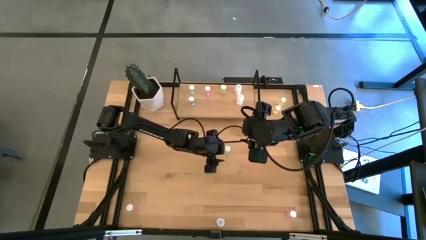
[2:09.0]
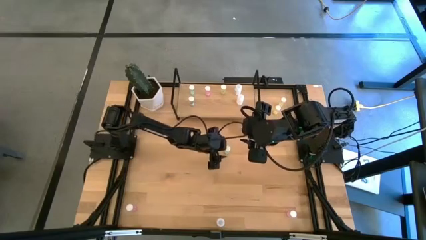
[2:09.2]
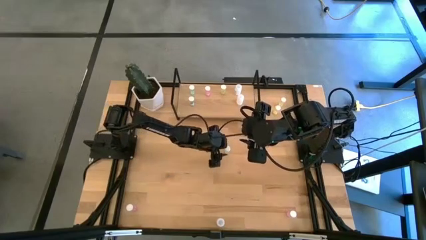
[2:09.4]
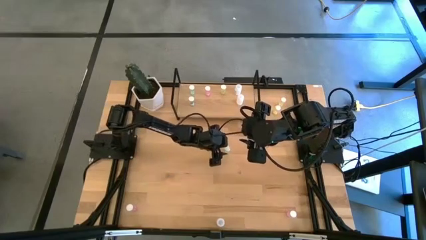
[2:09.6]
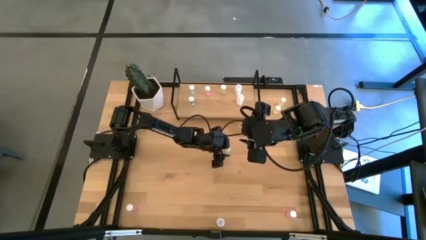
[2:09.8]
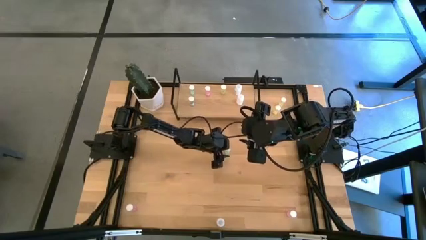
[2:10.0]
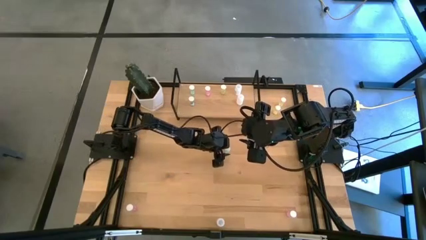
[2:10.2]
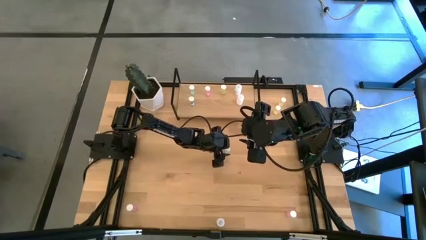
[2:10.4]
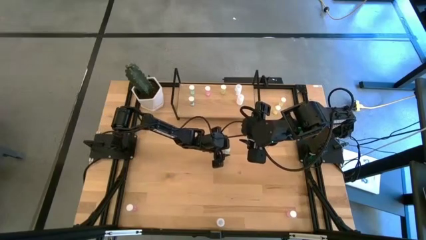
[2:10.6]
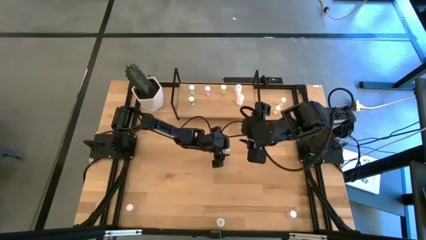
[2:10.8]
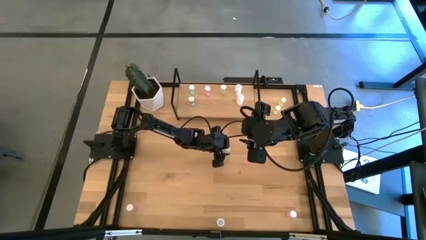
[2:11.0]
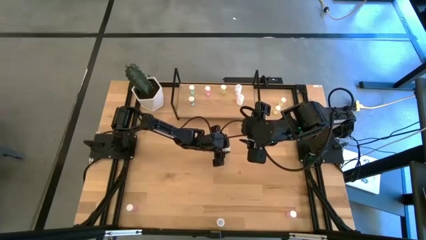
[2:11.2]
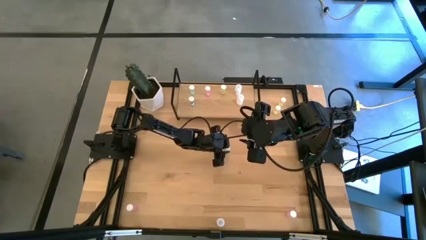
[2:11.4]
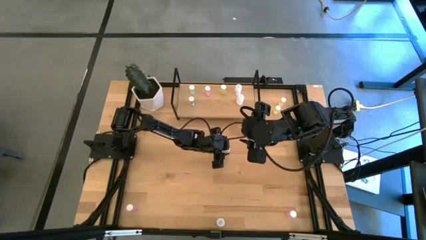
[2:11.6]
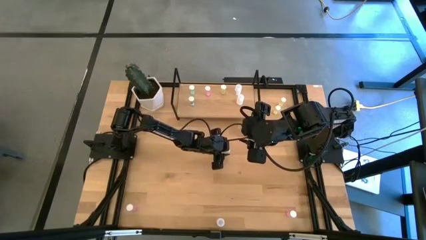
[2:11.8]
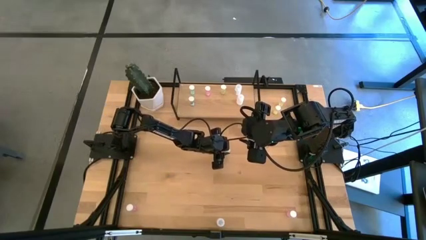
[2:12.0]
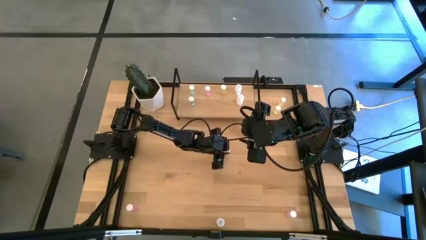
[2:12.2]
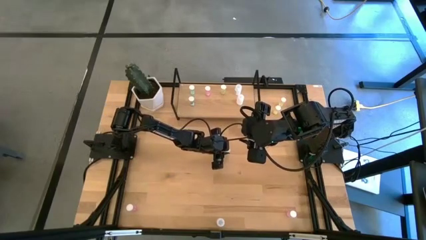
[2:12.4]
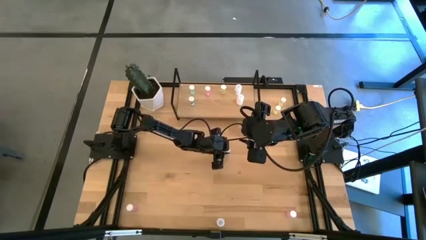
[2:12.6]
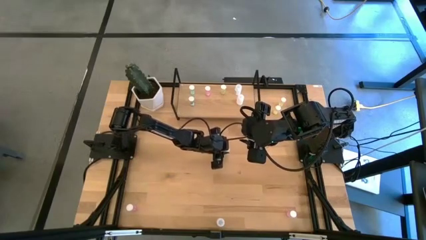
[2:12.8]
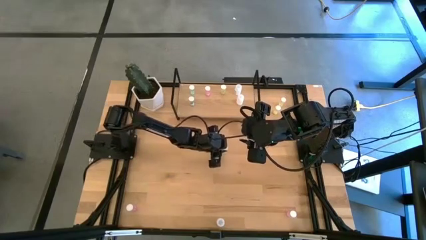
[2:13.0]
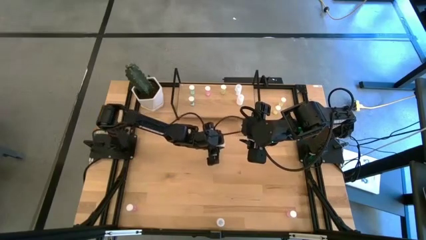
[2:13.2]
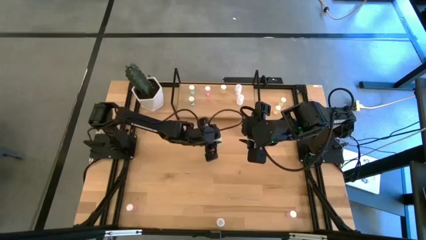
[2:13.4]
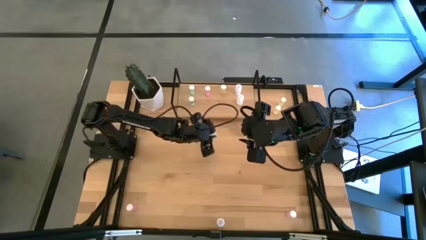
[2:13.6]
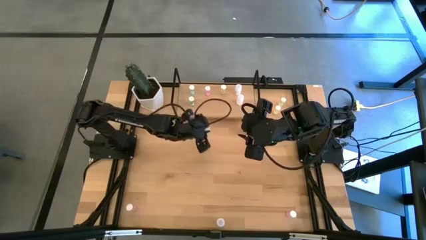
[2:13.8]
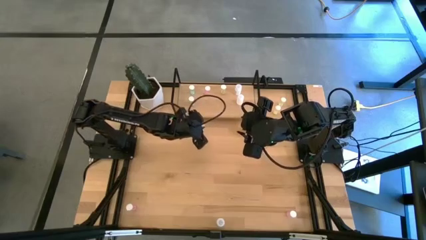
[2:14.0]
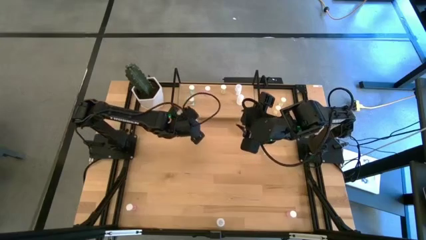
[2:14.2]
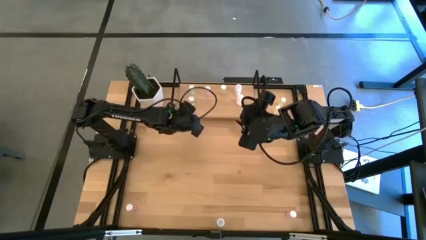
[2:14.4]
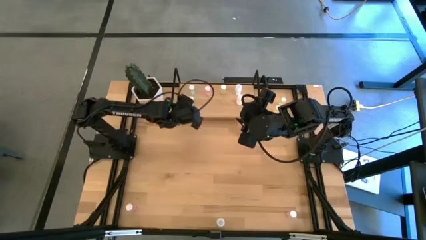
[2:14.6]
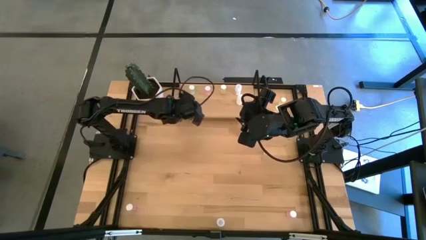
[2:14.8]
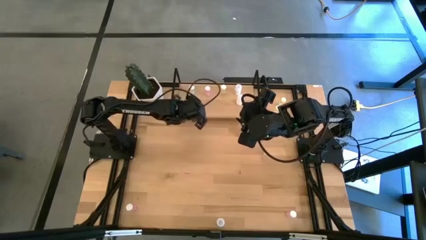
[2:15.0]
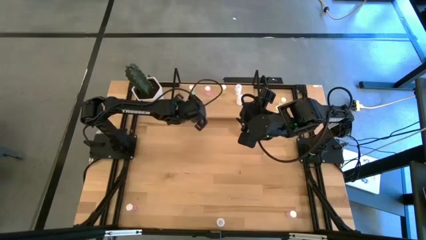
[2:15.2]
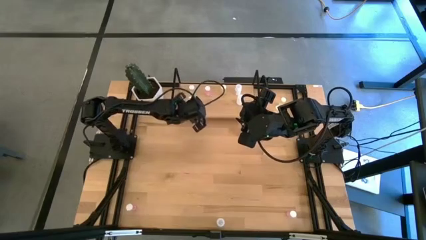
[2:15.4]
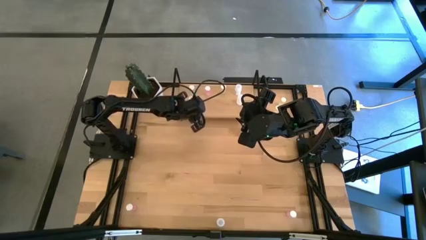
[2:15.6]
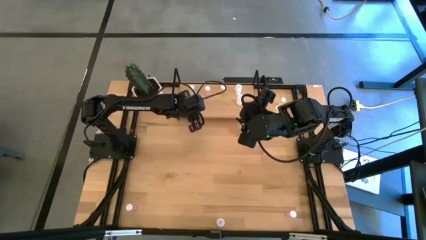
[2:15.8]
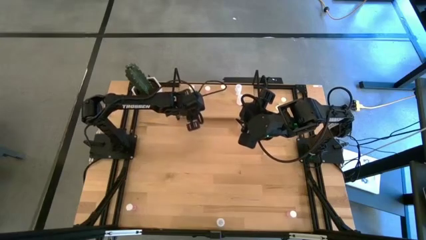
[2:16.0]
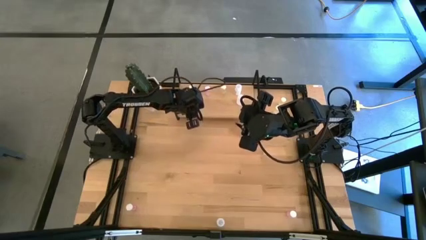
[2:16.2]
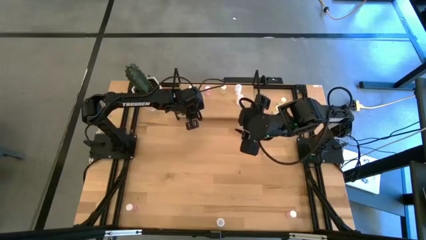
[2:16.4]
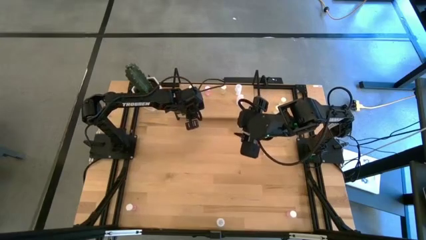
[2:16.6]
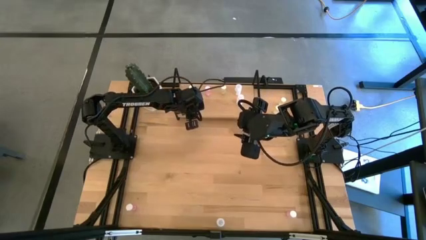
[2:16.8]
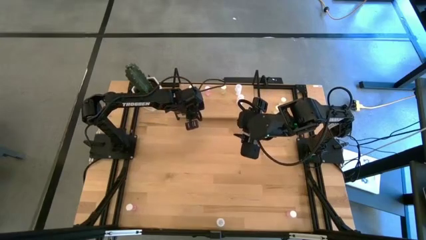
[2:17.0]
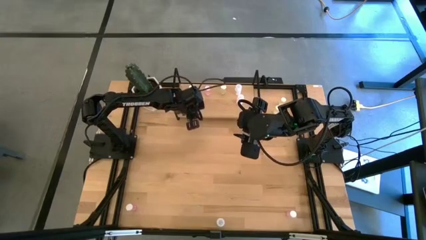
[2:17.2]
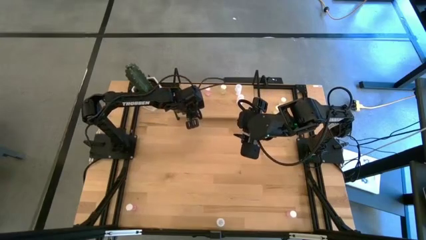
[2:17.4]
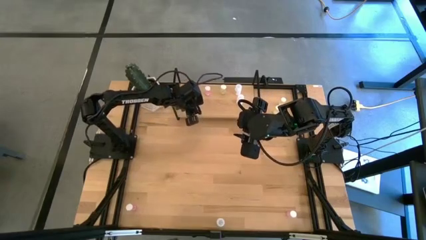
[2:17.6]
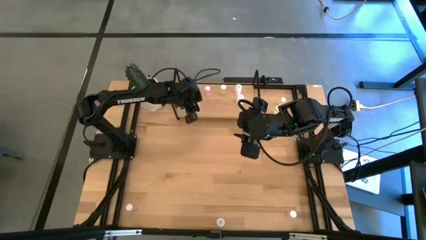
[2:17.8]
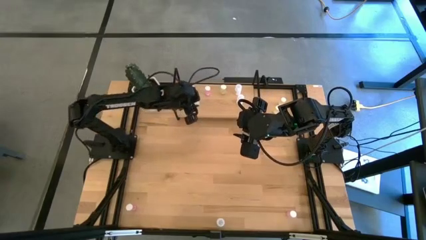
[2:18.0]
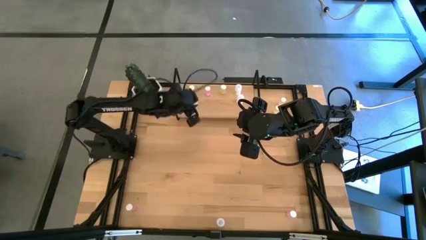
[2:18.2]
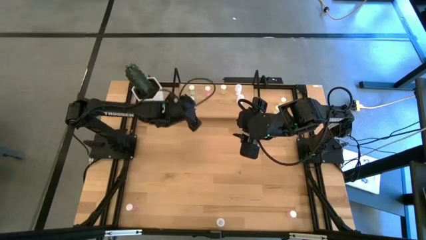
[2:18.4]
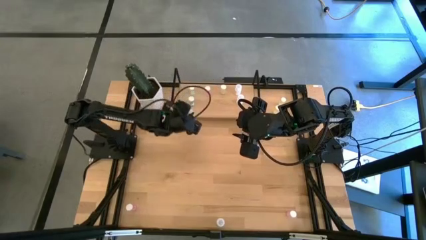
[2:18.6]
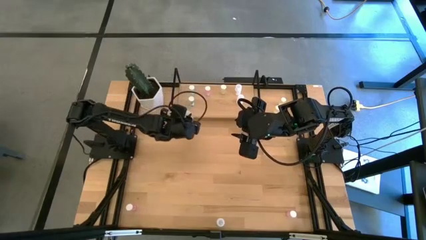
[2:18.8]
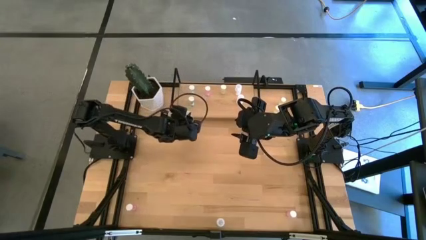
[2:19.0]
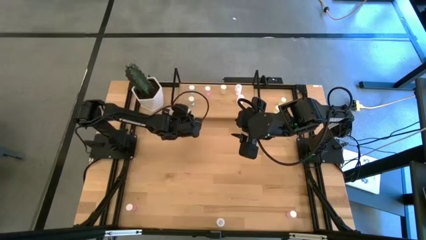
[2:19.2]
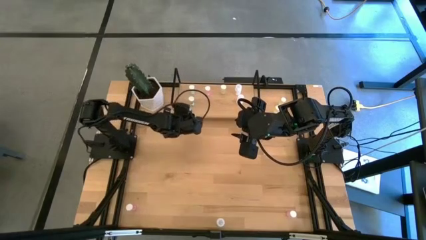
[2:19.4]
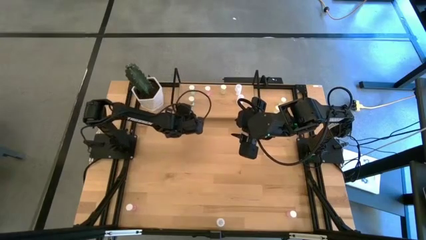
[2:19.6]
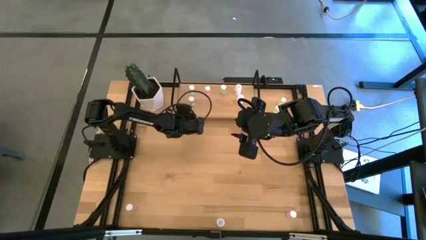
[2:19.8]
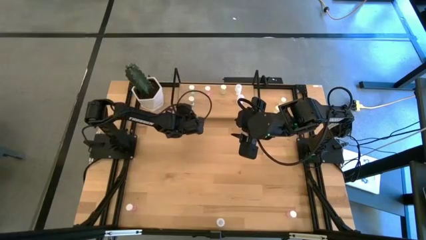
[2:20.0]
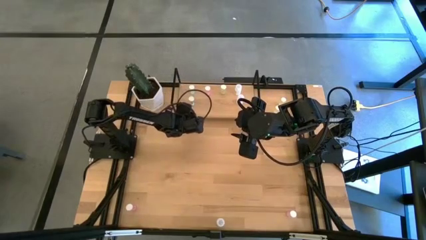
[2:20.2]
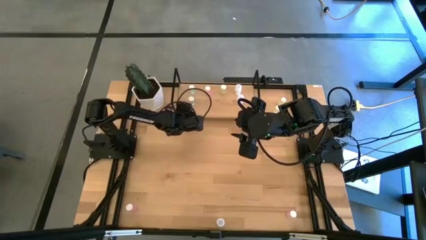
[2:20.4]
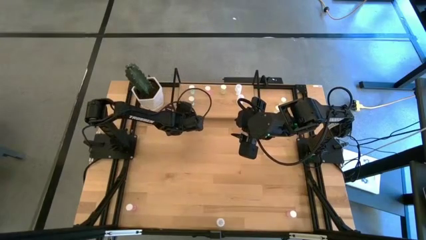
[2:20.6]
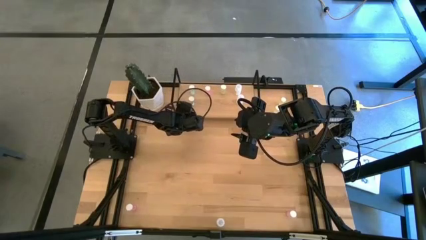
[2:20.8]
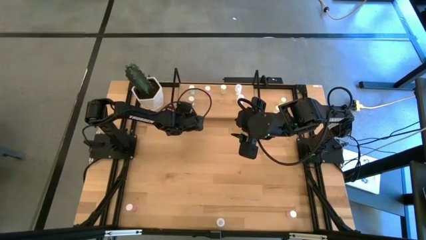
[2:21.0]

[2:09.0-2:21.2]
Task: Pick and place medicine bottles onto shelf by color
Put the blue pill bottle on the shelf aligned with the other blue pill bottle

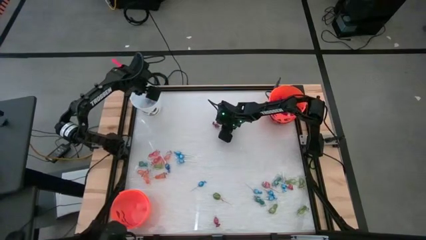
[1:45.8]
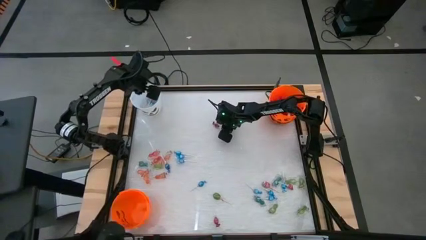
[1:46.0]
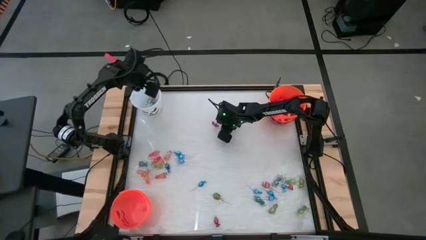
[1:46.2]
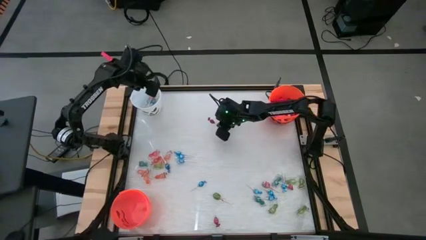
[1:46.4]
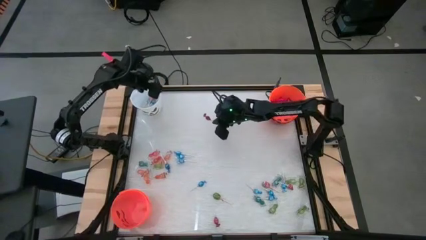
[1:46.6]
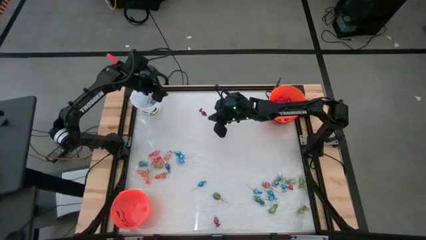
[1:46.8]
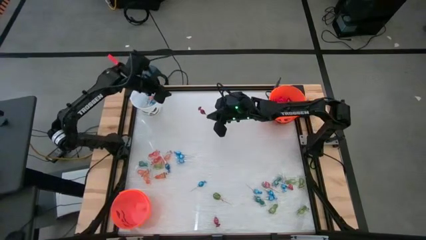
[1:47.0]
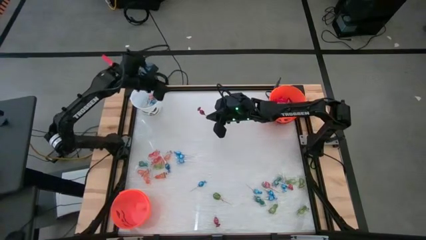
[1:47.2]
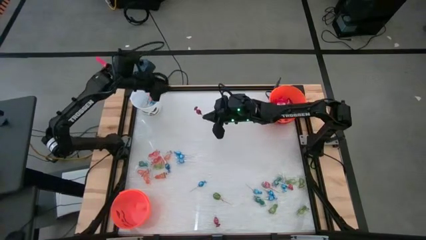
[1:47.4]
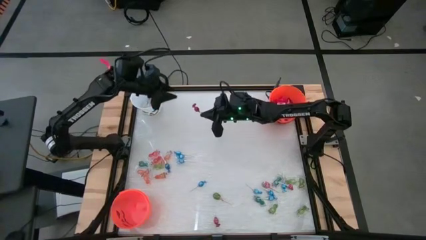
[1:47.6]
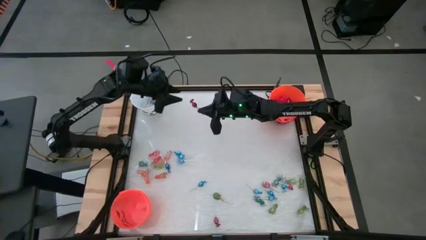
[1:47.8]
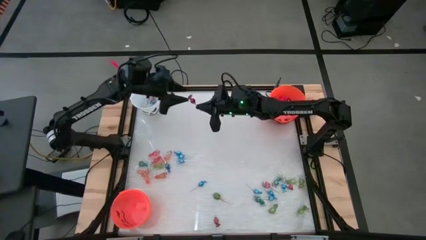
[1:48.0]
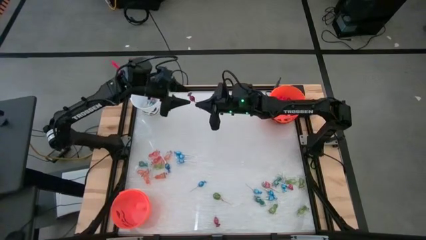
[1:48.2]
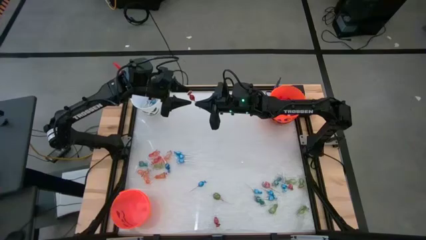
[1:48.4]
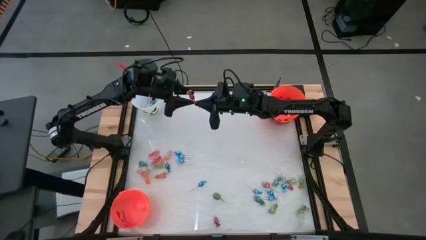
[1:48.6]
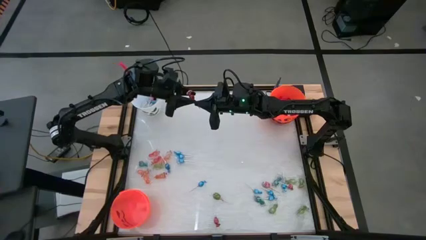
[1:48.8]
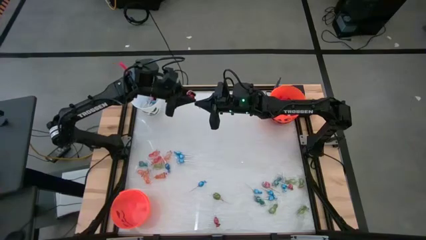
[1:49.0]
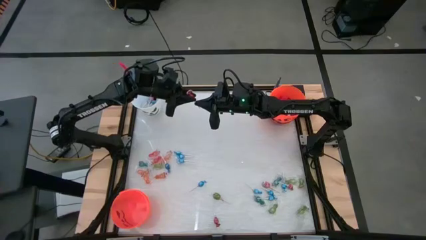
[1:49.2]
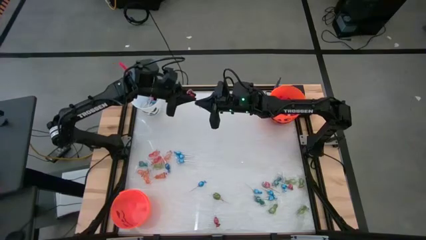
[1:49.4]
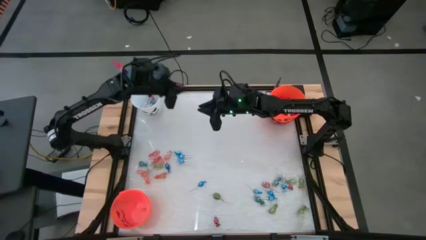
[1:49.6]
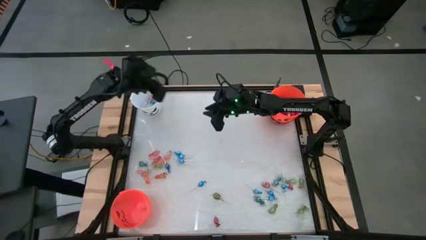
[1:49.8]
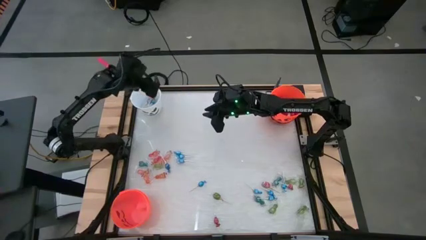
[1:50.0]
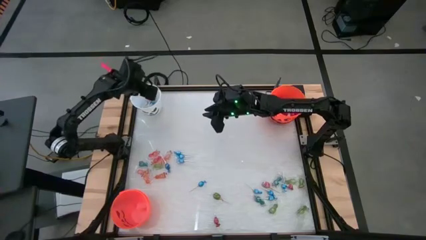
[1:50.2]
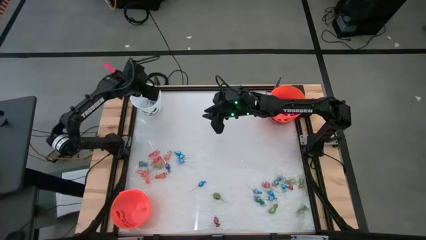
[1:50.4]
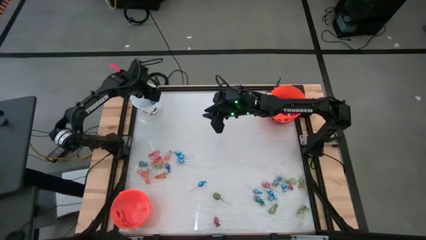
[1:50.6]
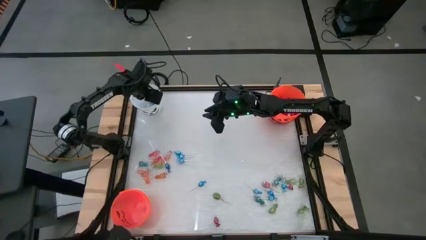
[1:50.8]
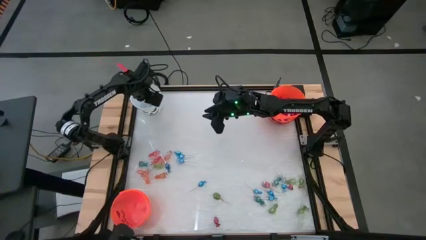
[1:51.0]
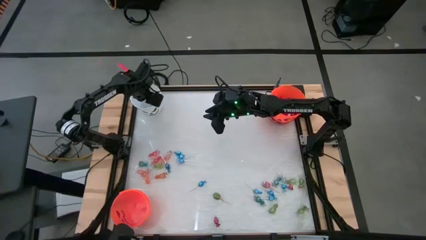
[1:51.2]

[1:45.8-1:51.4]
Task: Sort candy by brand, put in halloween buckets
Put the red lollipop into the white bucket
